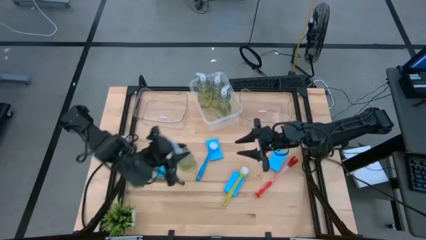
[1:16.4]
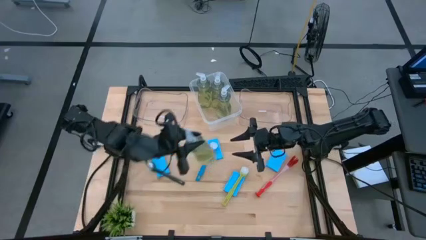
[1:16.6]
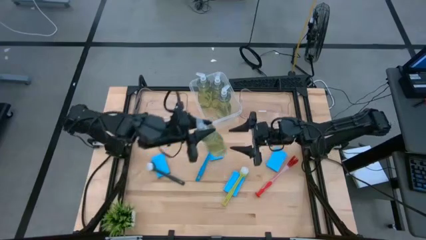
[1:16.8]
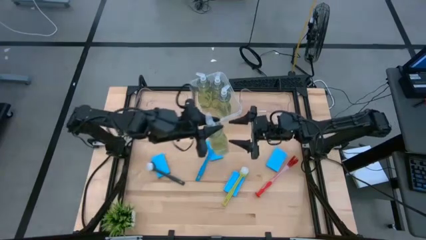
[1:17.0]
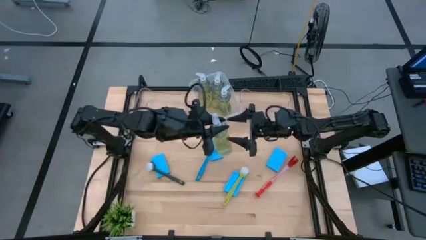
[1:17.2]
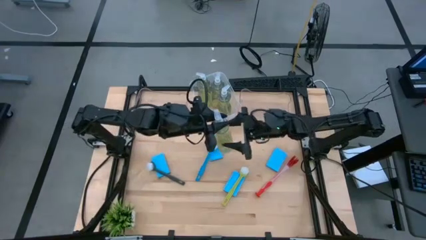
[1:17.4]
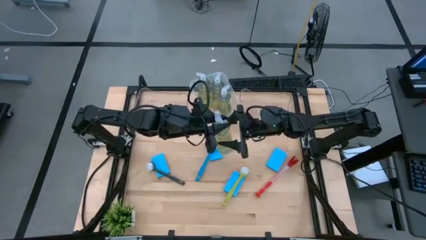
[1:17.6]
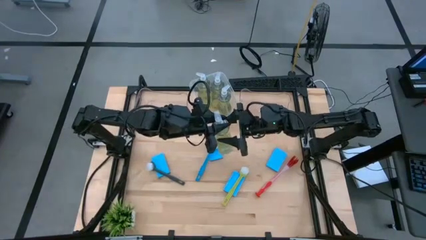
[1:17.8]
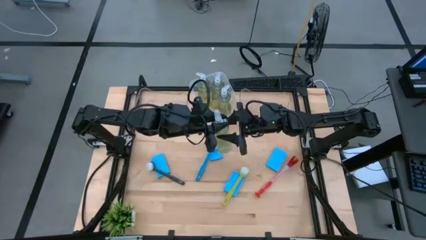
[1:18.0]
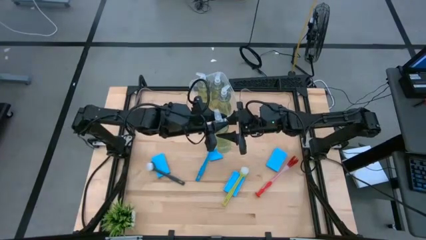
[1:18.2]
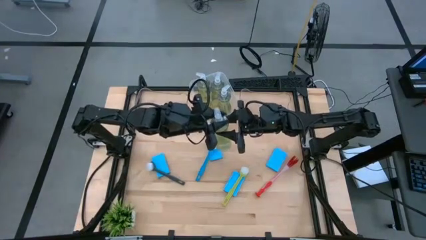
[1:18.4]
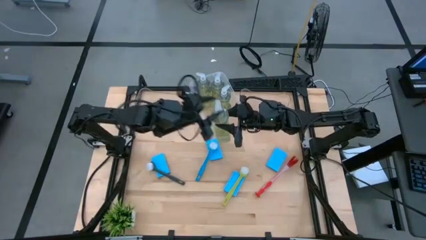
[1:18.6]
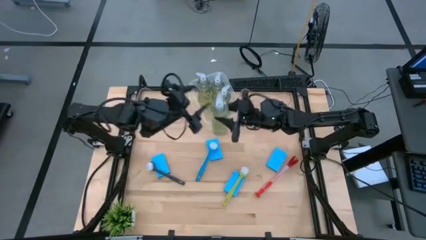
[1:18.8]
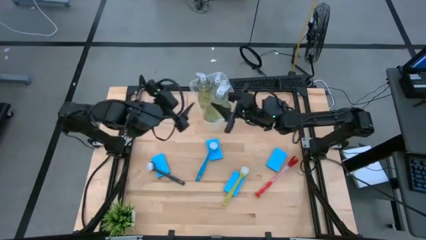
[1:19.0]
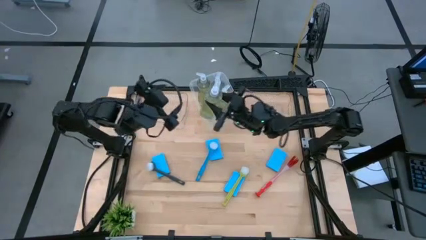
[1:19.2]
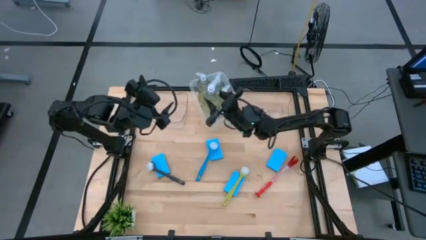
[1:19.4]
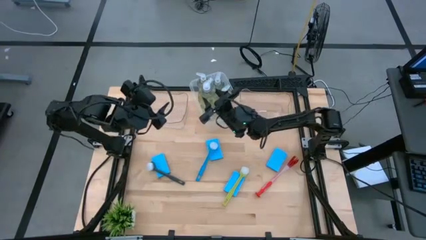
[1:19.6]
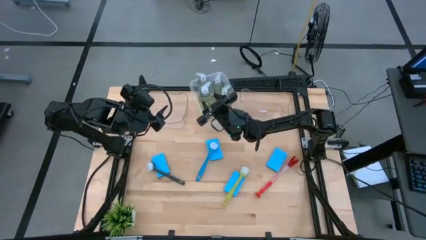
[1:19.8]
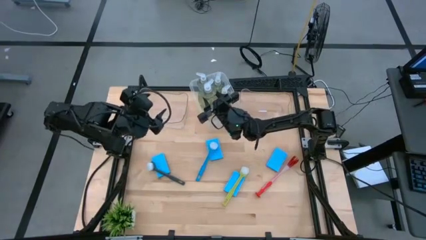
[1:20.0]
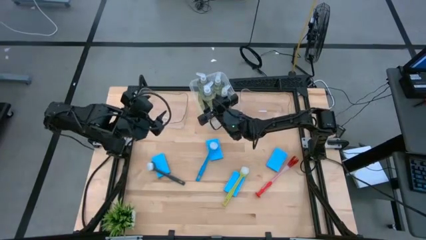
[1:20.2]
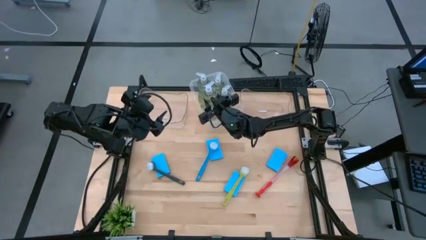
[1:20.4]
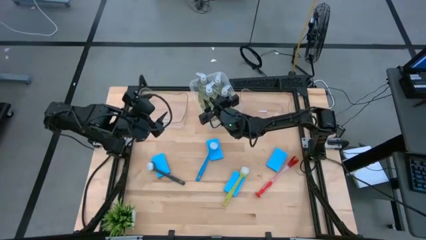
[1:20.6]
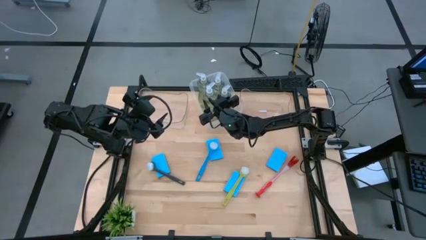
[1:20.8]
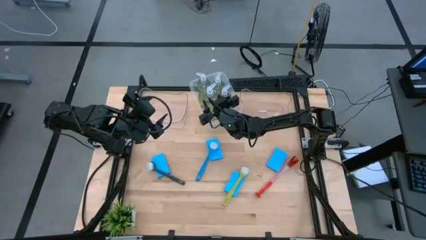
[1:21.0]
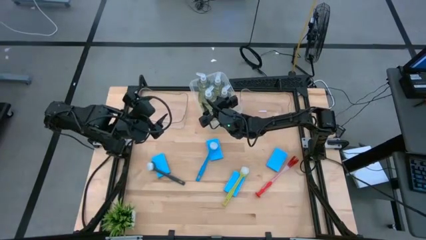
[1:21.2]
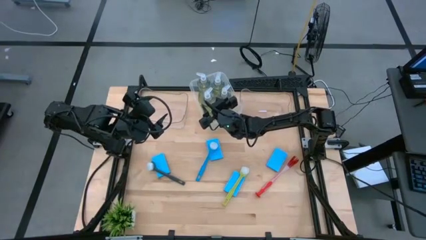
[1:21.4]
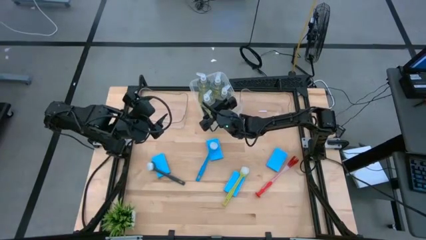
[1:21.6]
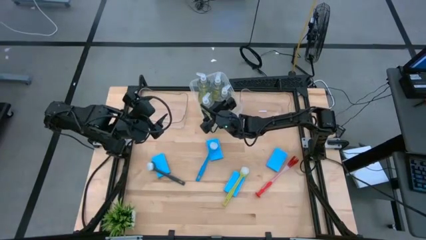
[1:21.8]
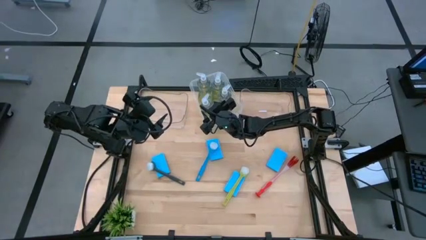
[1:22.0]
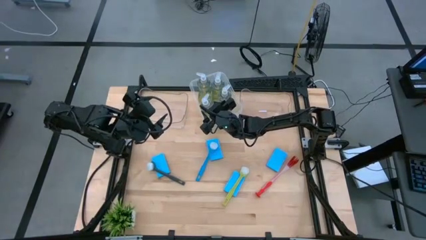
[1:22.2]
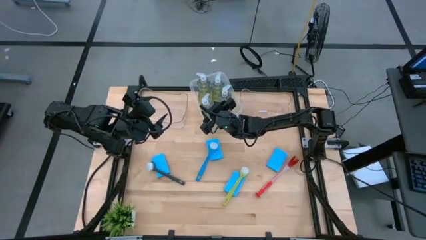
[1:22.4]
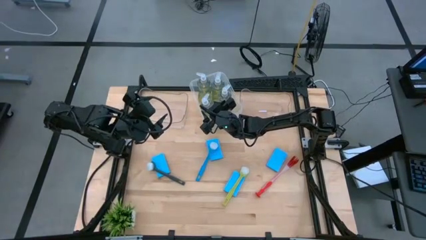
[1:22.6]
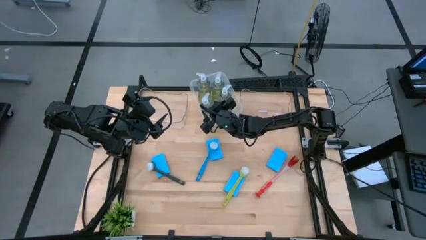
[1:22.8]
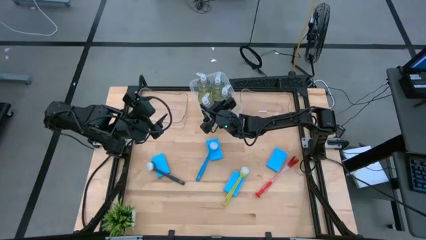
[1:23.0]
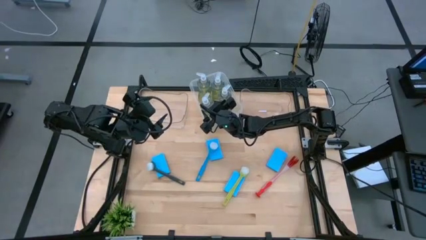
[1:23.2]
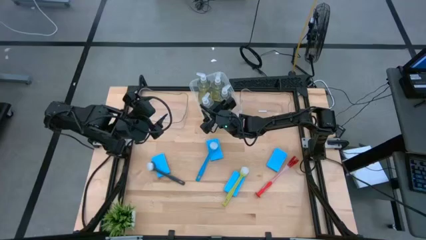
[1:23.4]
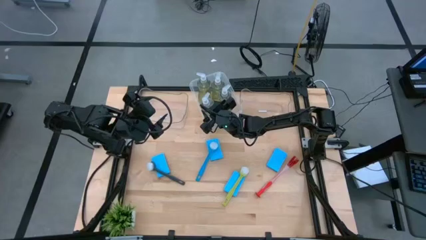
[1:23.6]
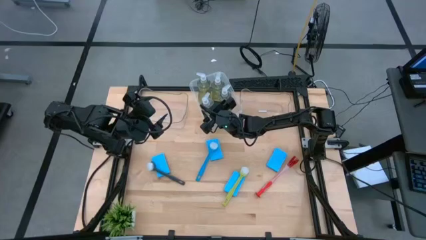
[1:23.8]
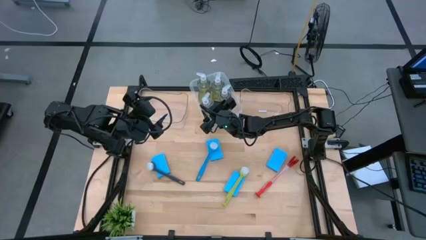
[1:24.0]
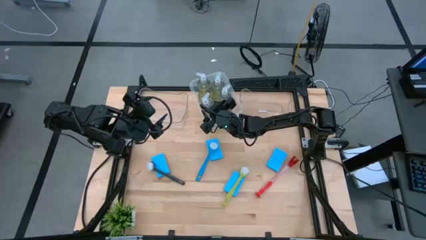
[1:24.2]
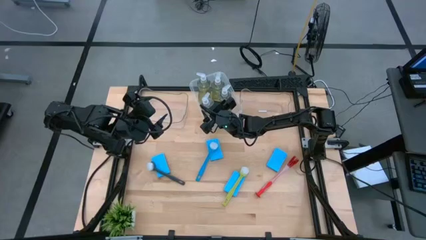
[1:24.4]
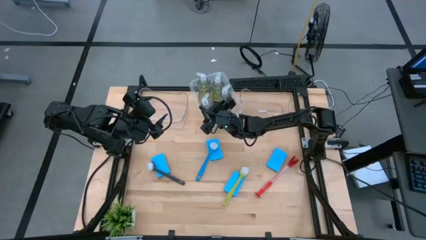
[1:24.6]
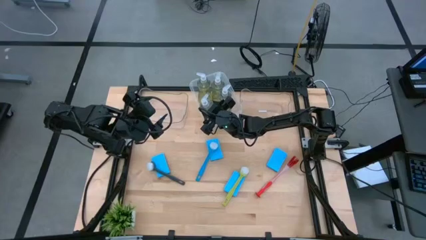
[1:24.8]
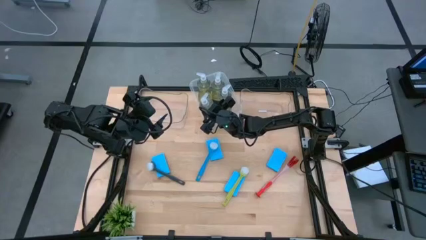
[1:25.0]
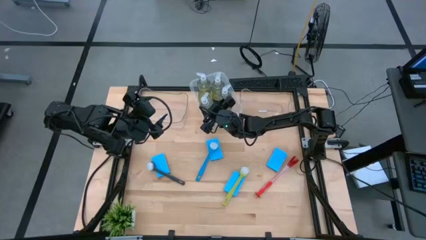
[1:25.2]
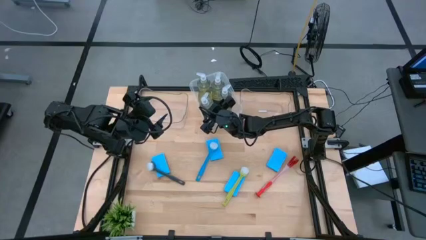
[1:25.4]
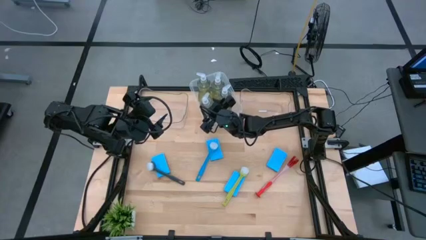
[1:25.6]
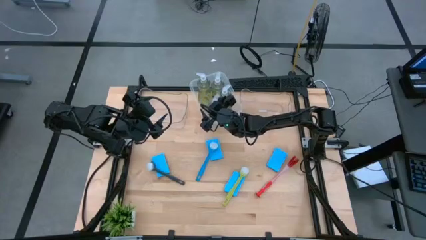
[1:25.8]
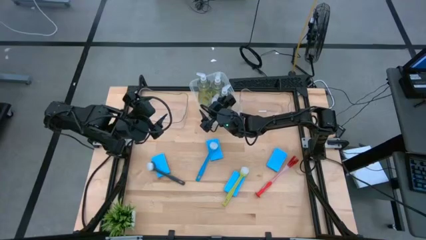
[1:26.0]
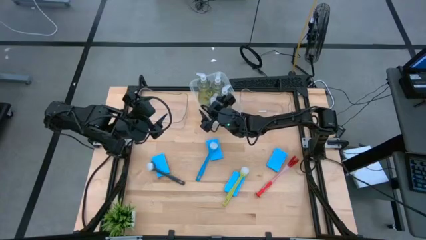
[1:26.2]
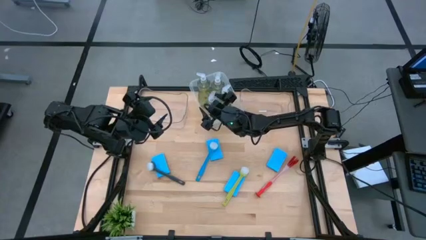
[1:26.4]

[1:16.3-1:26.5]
Task: Pick & Place Kitchen Sink Supplies
Put the dishwashing liquid bottle into the white bin
